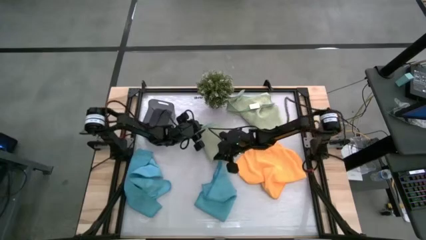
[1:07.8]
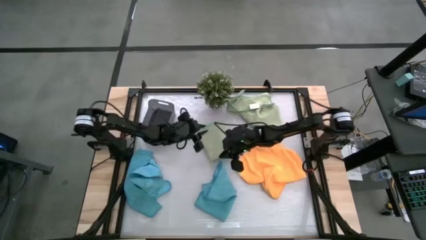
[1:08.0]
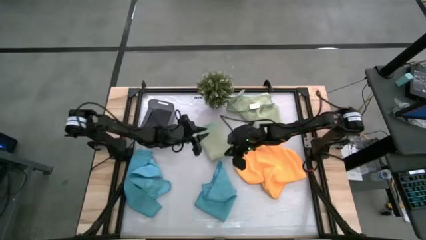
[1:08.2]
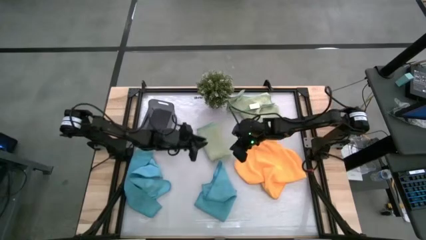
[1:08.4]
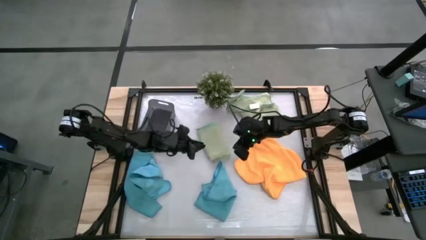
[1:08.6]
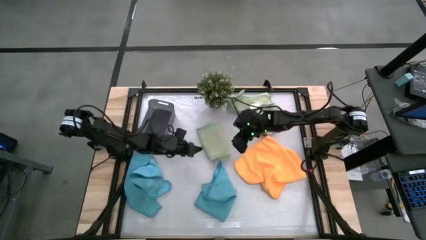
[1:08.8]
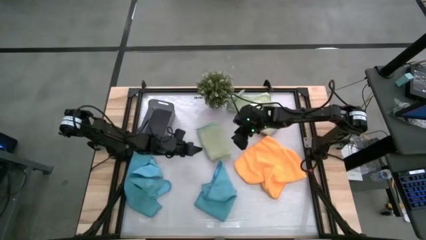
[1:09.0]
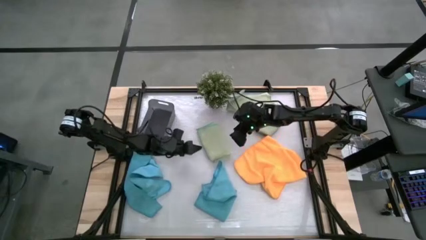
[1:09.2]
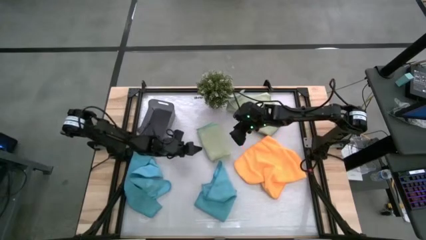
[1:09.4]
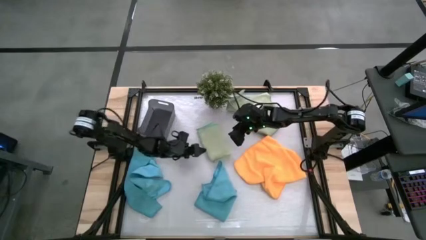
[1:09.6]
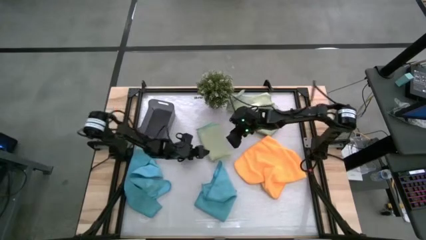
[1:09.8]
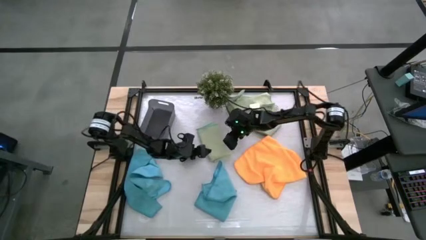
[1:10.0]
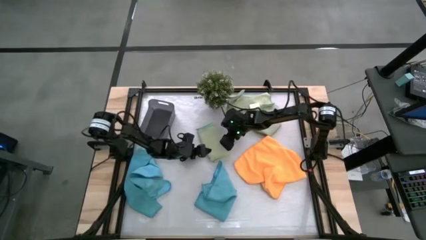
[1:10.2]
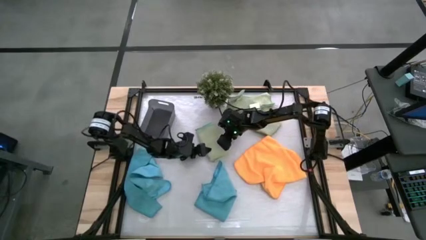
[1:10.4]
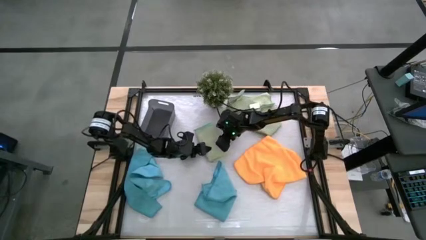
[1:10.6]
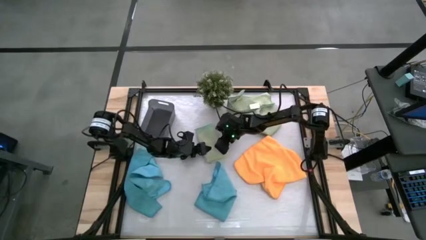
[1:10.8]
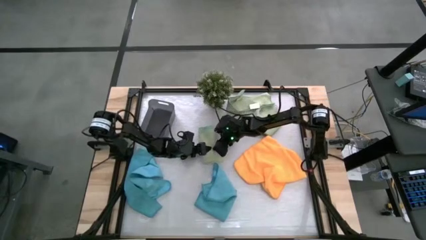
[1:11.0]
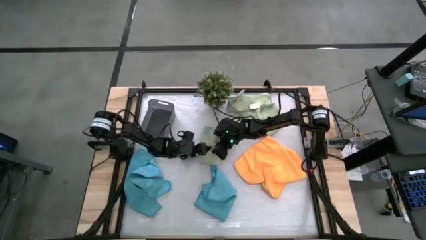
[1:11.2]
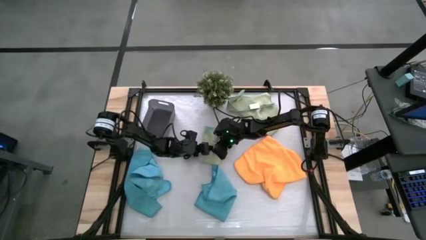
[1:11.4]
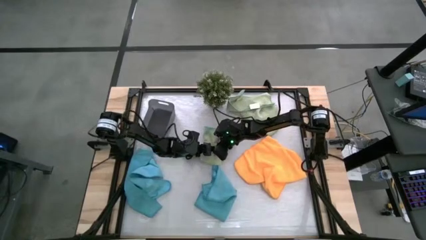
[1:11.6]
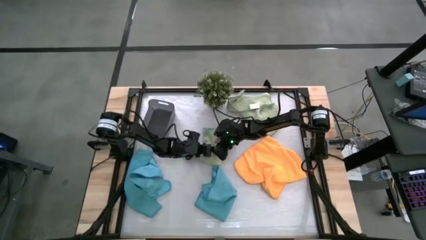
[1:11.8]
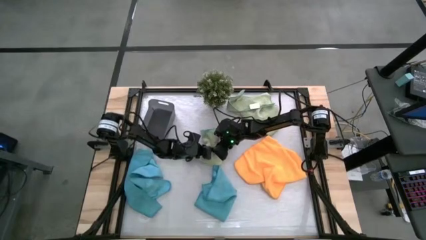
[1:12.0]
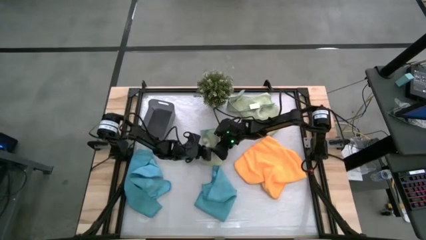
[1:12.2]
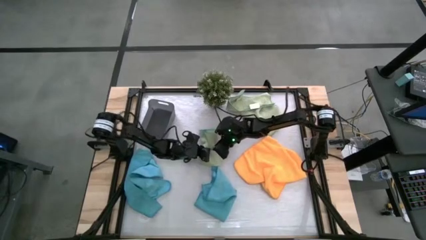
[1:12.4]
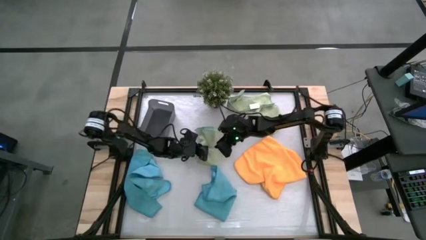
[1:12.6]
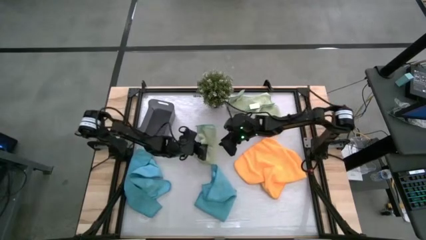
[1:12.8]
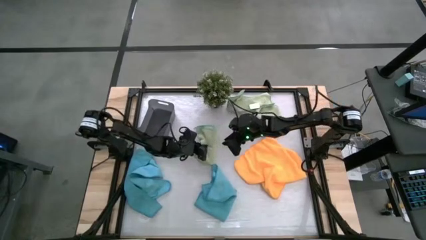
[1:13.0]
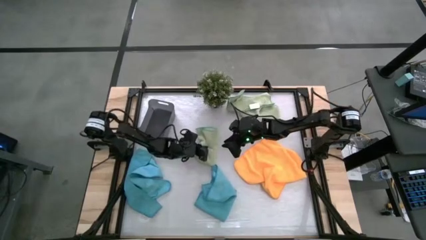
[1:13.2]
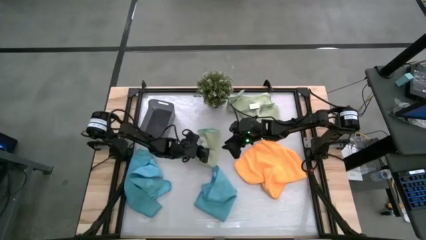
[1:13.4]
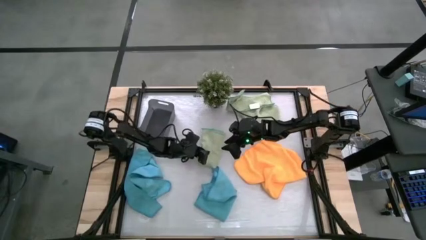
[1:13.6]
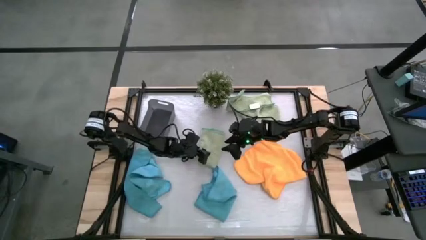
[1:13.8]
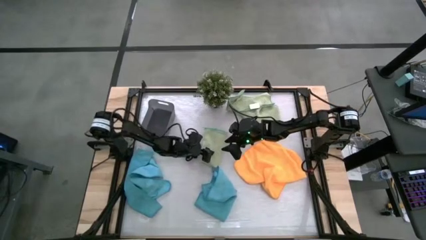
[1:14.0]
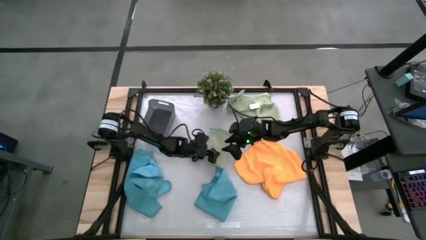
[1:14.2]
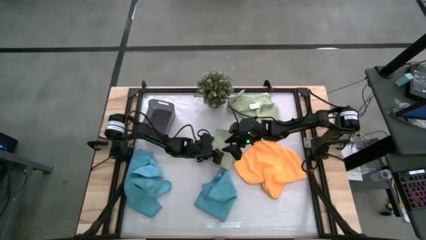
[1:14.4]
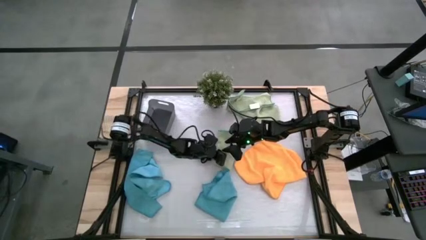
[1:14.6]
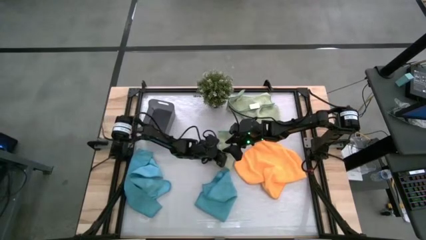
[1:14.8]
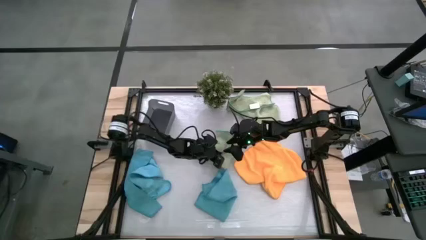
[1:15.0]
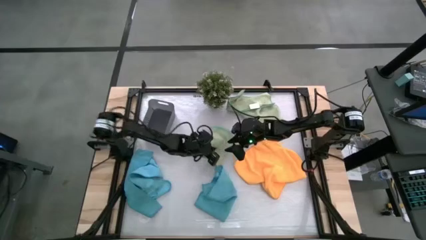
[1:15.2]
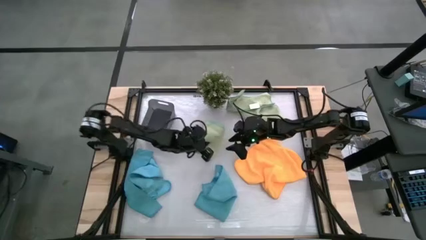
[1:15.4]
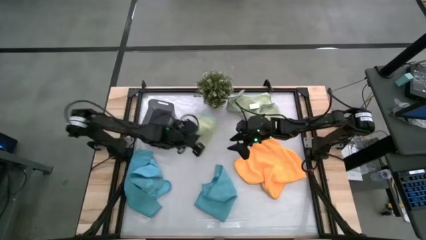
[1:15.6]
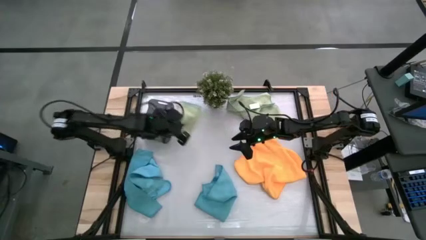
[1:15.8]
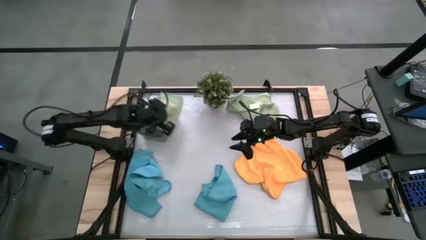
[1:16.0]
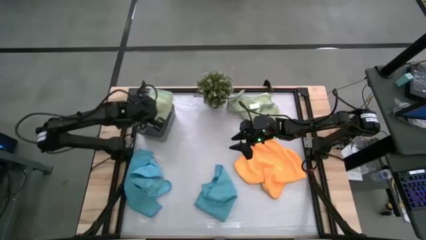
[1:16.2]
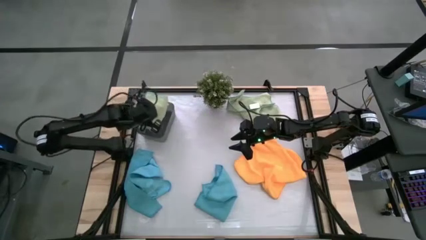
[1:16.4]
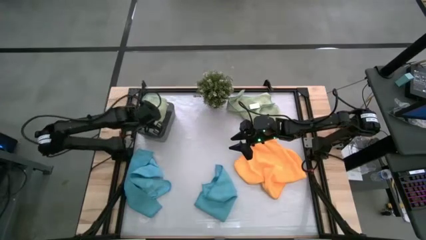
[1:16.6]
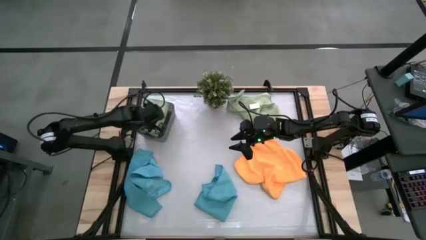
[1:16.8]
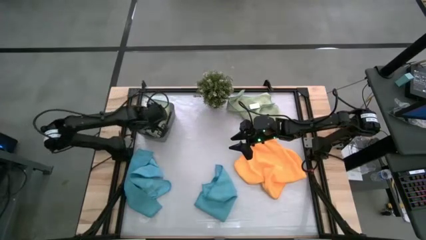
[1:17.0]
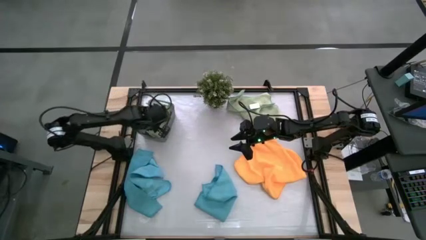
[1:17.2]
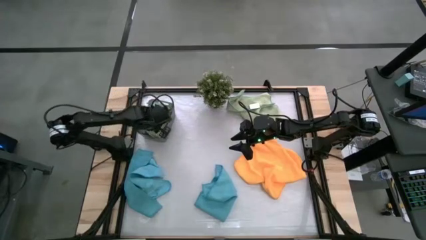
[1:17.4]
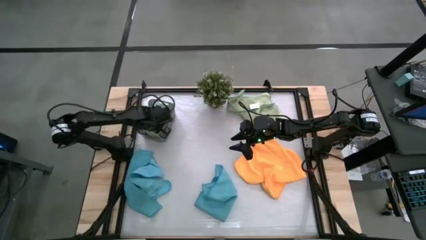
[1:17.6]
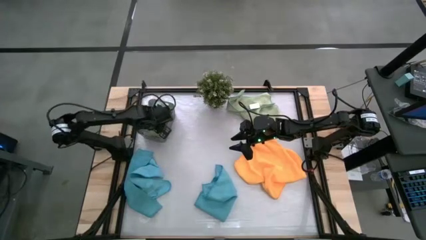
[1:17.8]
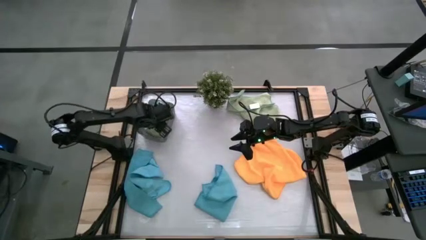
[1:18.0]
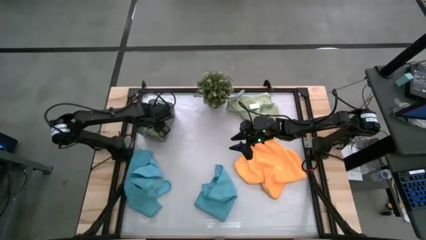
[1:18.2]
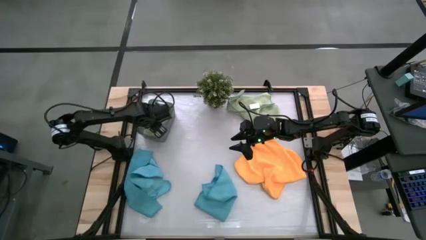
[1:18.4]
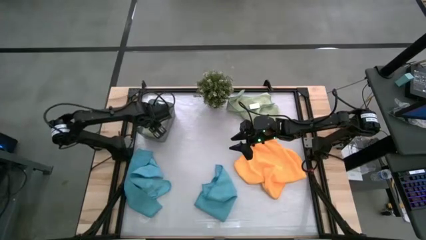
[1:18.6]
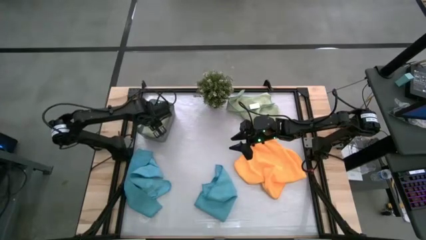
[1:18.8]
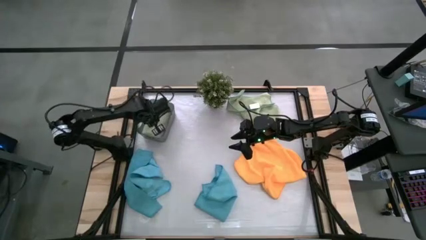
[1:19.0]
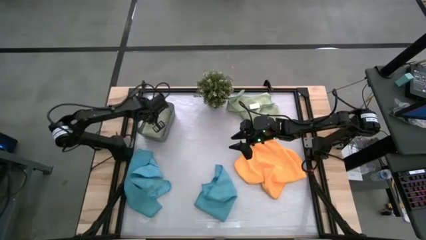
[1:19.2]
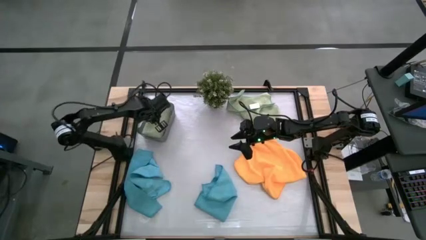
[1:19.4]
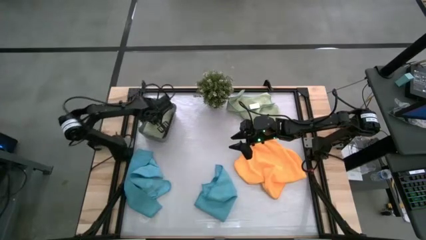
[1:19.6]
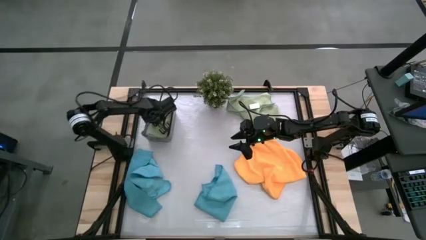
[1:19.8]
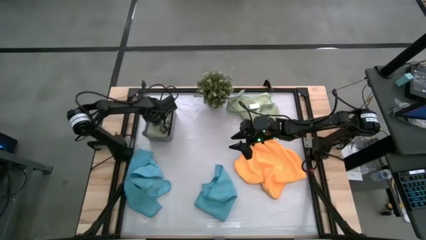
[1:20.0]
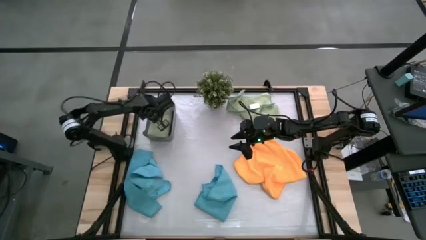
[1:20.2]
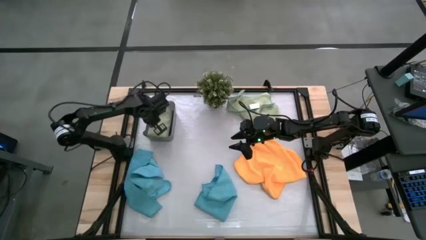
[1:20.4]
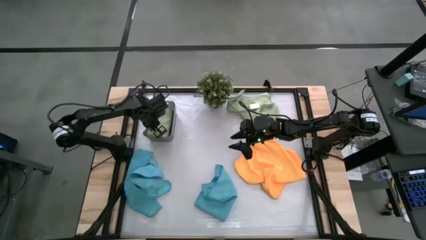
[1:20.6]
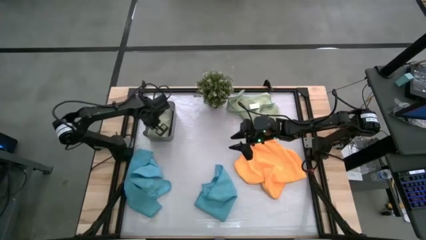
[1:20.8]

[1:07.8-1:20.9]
Task: Fold microfiber towels
Put the green microfiber cloth into the black bin
